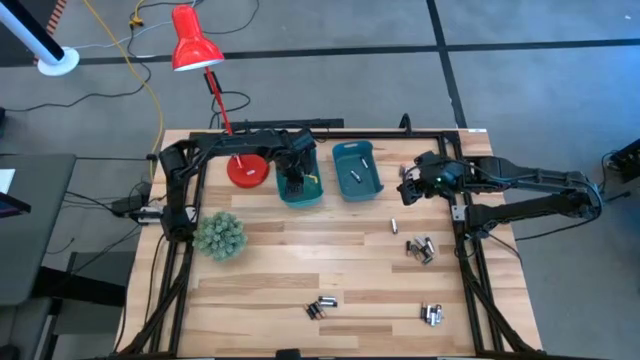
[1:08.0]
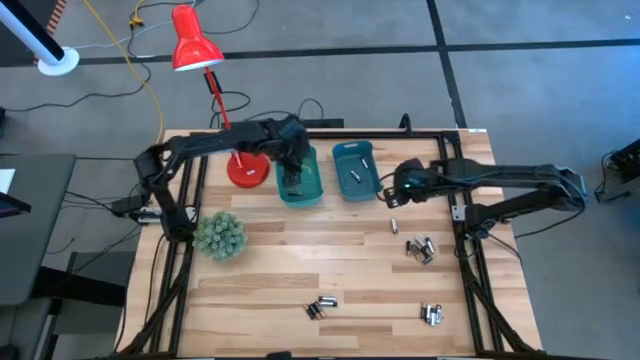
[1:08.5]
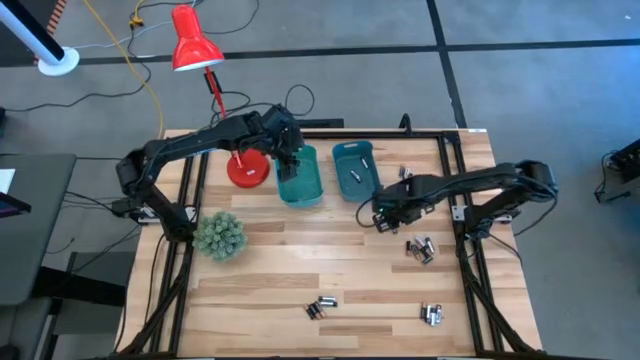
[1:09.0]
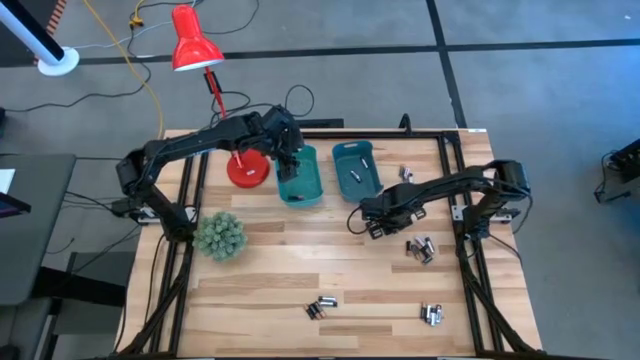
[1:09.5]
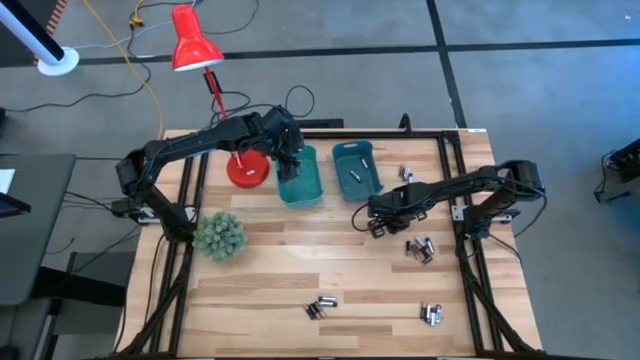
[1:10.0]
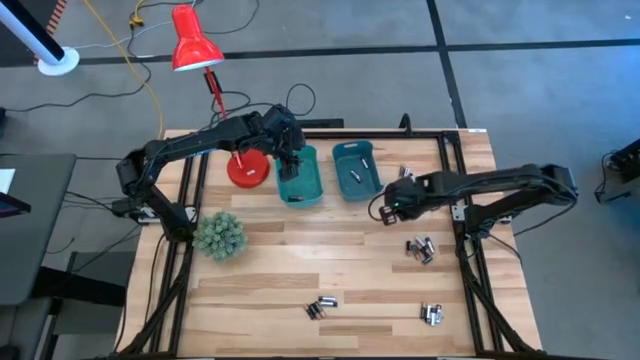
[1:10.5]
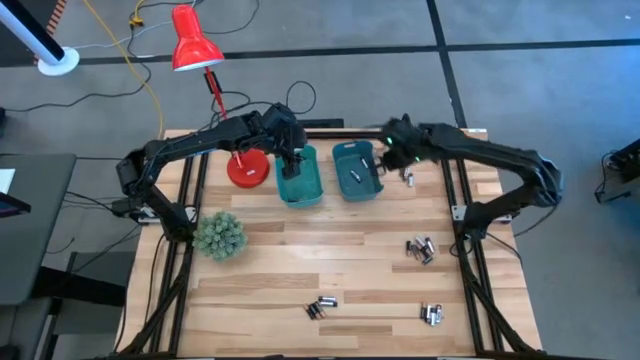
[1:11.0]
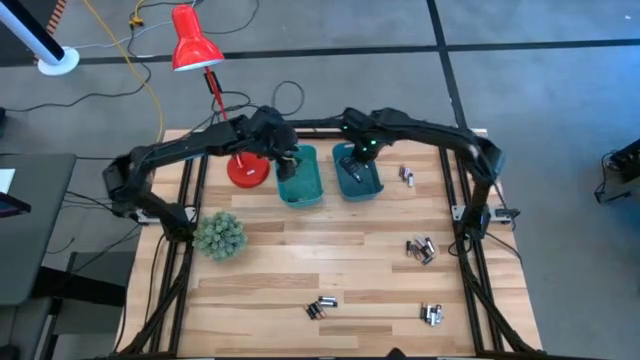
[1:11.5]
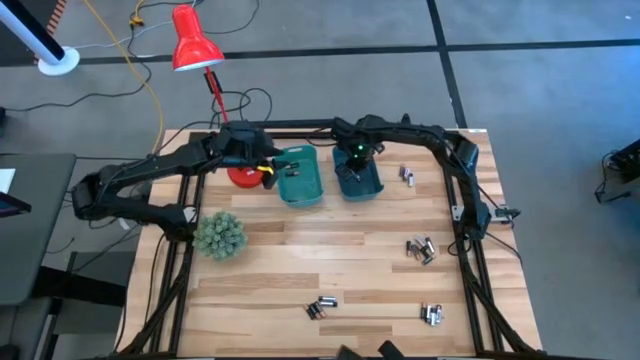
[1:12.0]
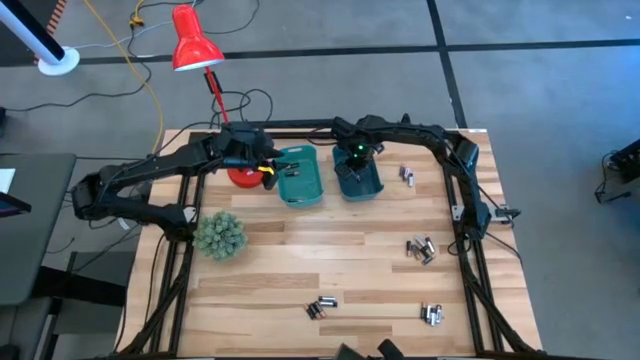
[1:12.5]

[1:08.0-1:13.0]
Task: Sort batteries
Put the silver battery into the right blue bin

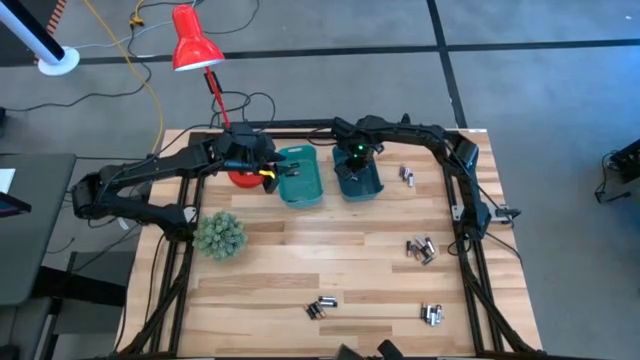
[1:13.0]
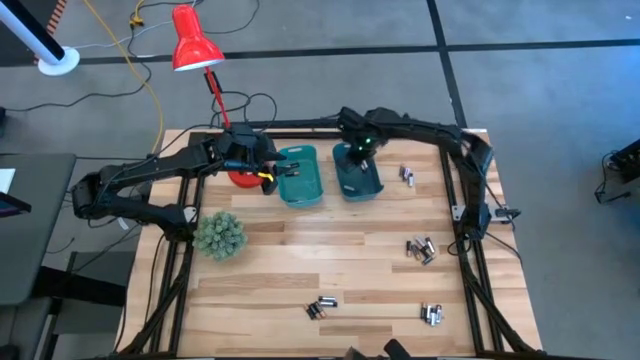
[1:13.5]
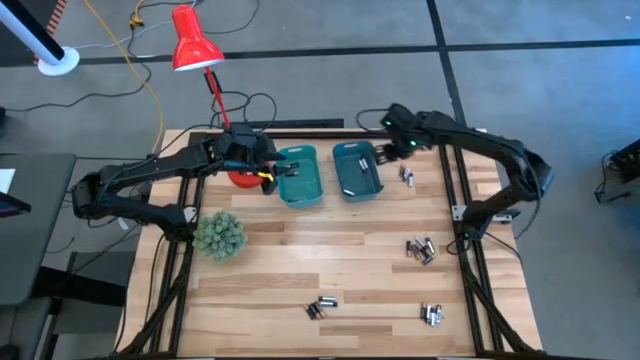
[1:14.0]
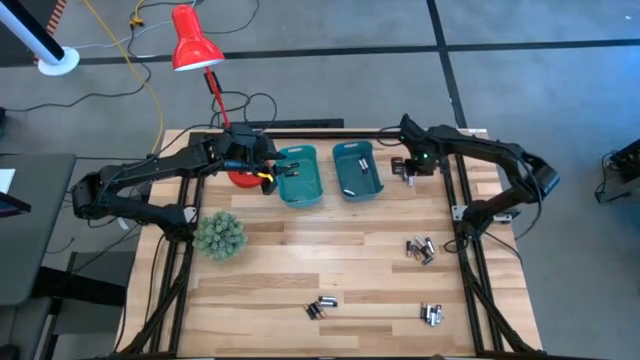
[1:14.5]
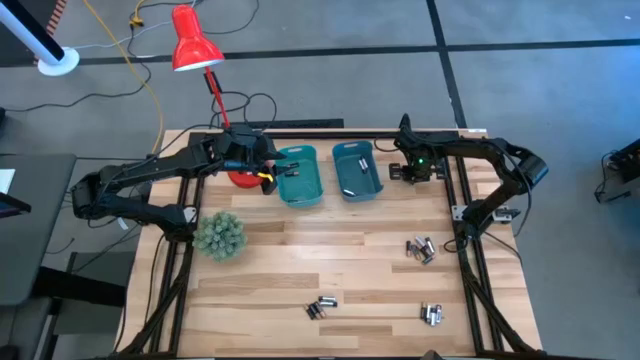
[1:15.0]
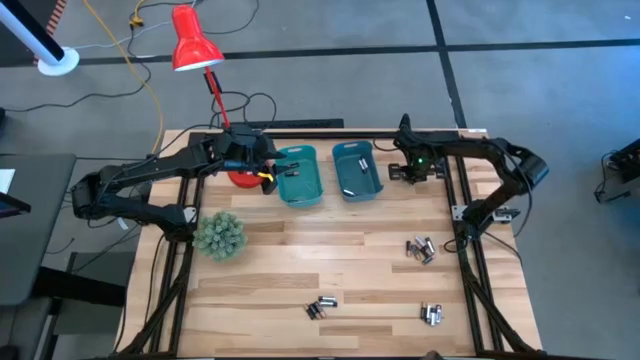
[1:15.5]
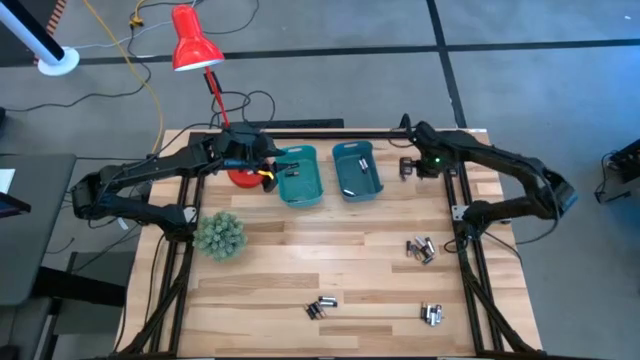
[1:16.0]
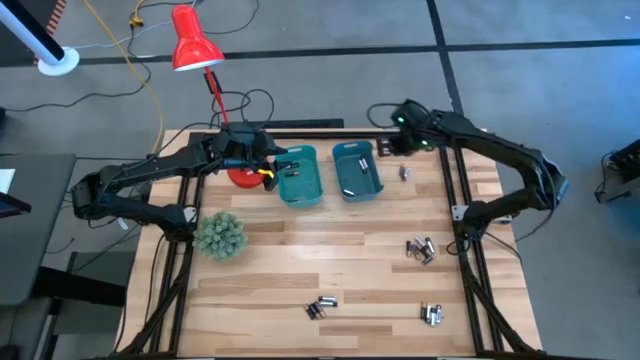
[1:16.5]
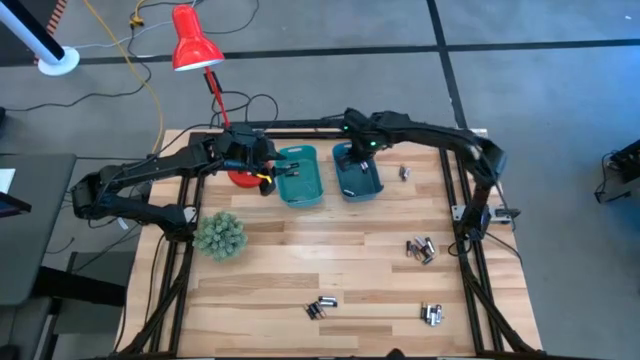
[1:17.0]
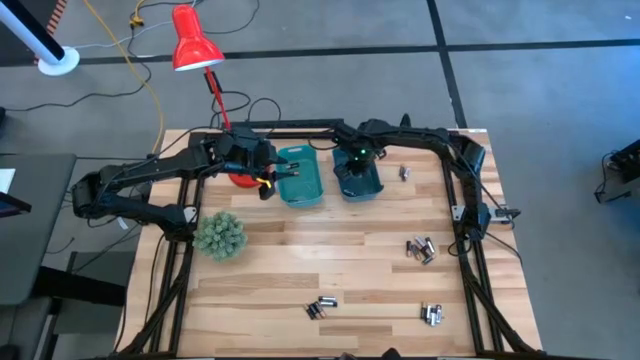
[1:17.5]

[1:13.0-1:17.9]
Put the silver battery into the right blue bin

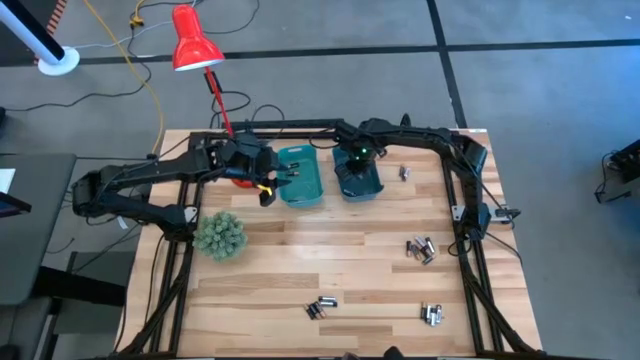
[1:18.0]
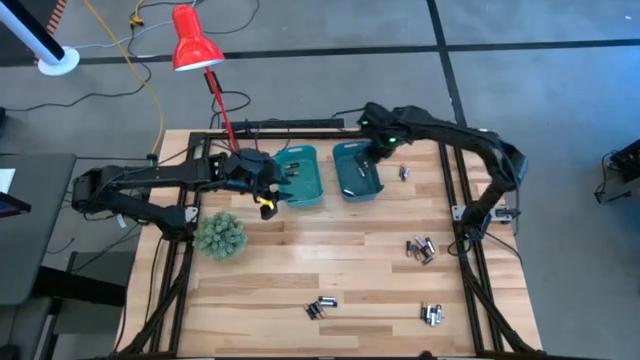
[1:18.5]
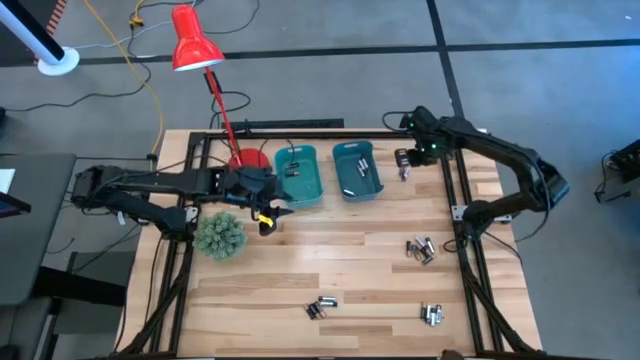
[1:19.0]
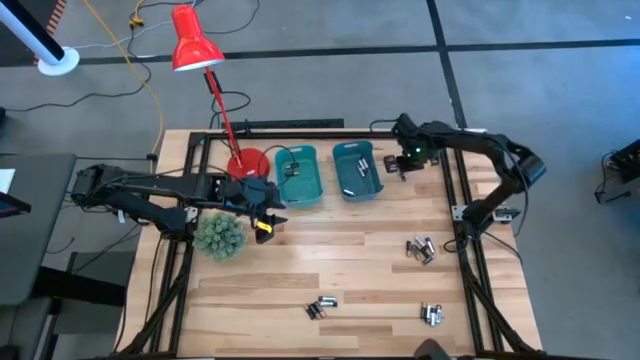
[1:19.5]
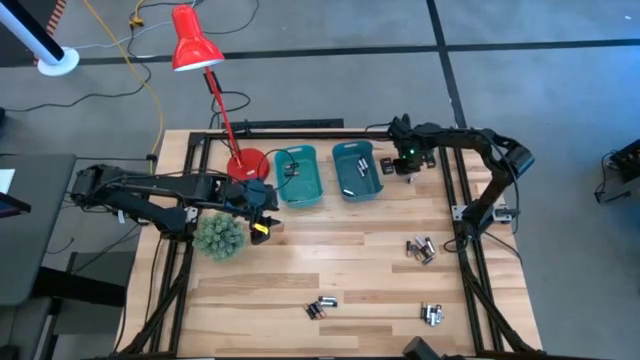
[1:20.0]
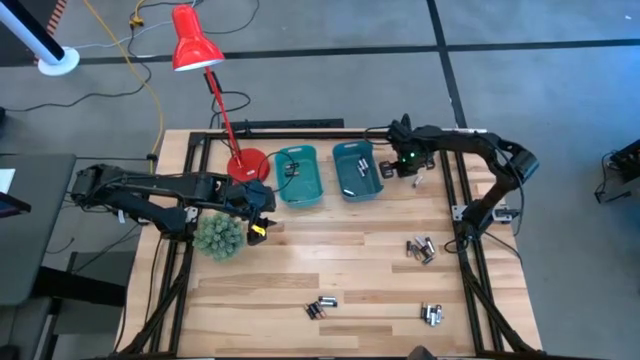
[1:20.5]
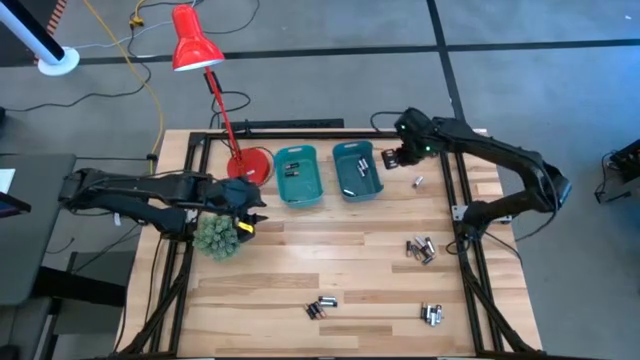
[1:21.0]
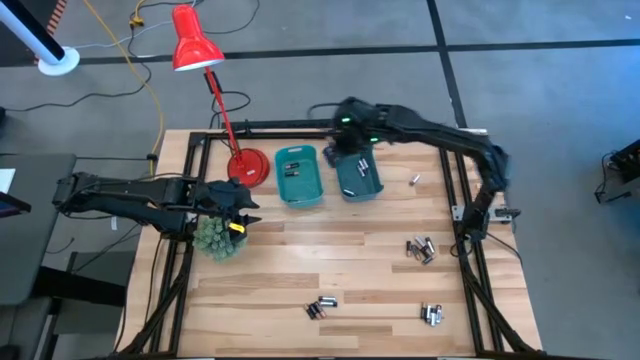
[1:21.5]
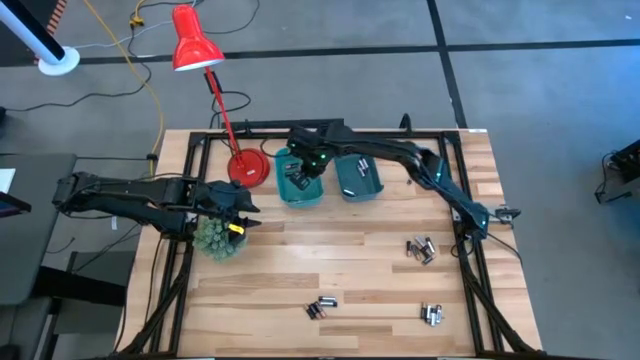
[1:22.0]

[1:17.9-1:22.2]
Put the black battery into the left green bin

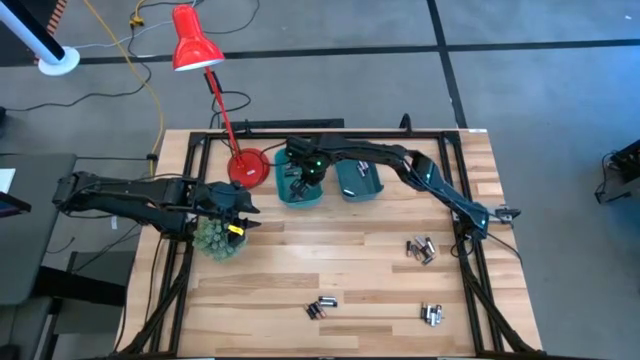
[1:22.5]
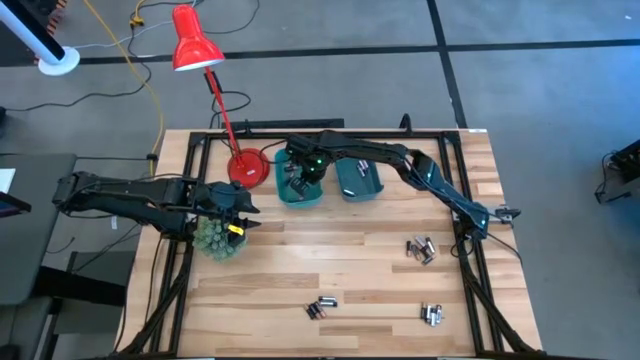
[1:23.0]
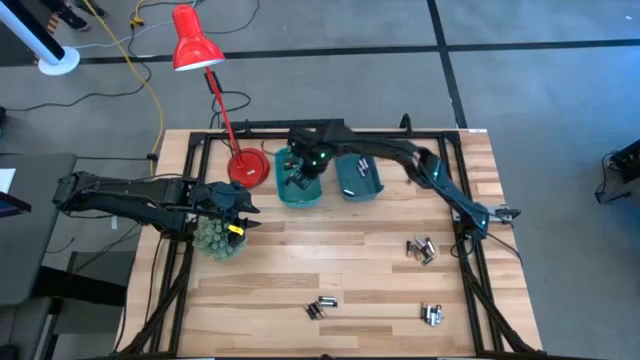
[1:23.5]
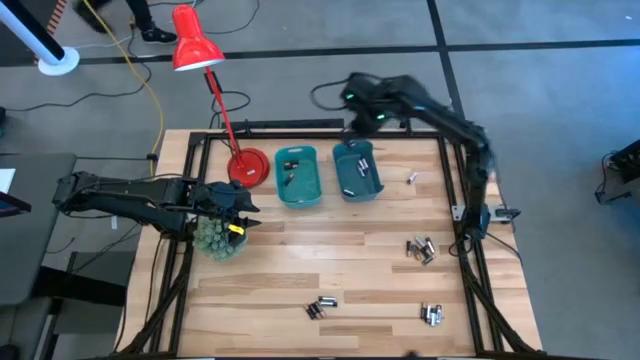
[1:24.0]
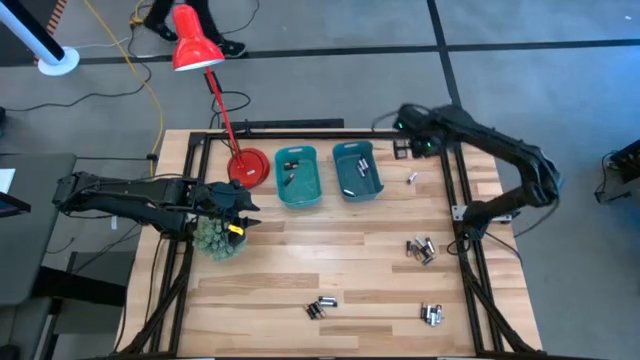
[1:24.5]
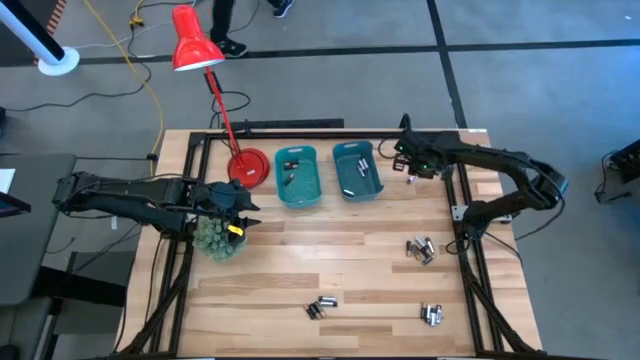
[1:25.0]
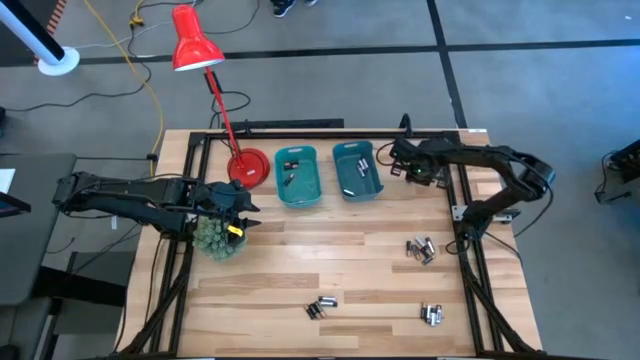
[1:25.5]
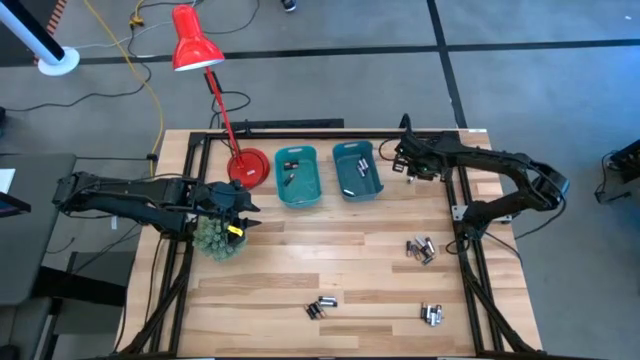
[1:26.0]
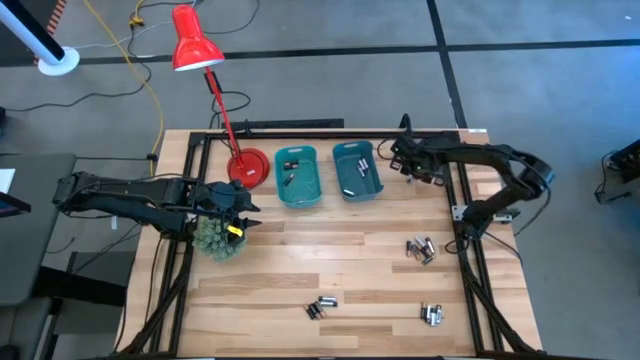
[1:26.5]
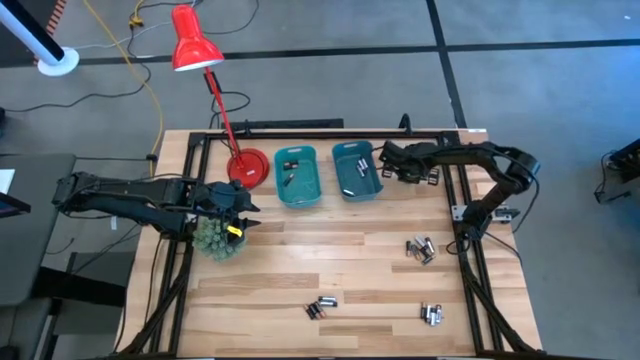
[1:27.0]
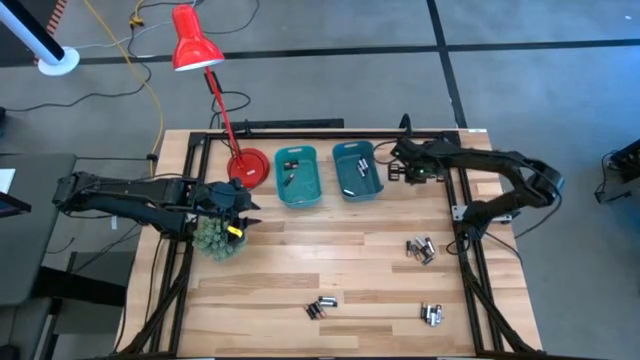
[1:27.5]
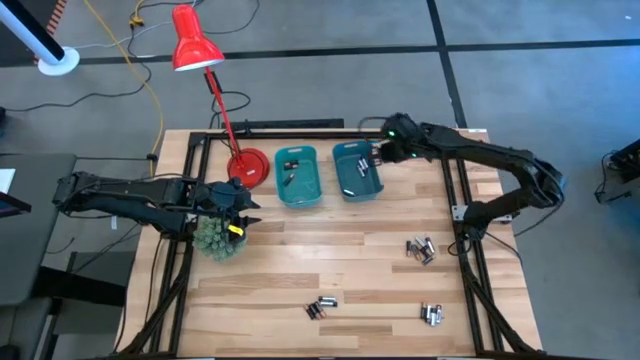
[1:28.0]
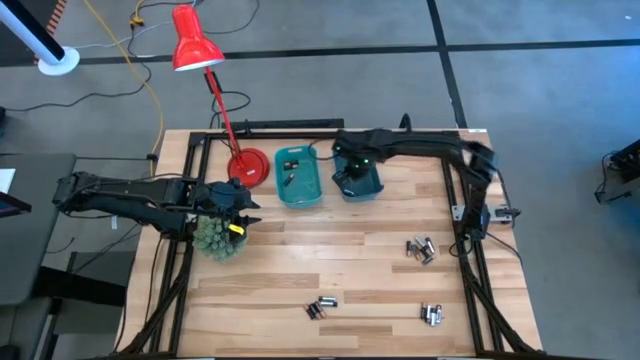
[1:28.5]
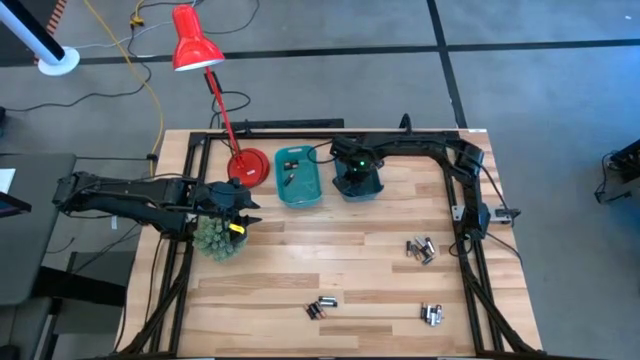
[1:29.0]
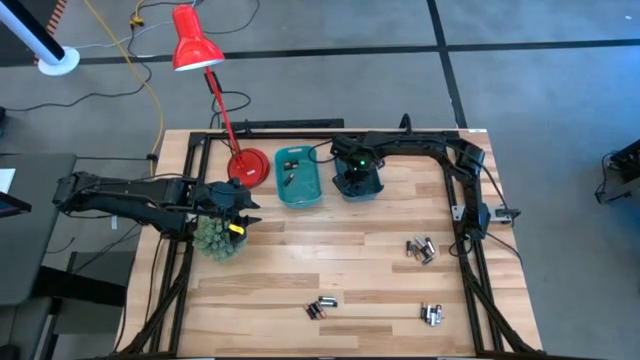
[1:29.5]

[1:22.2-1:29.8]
Put the silver battery into the blue bin
